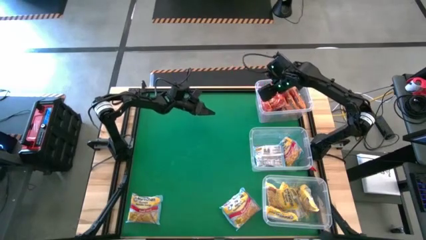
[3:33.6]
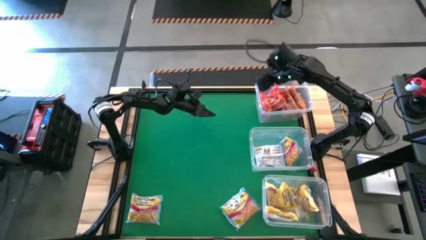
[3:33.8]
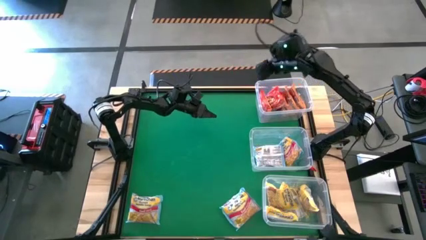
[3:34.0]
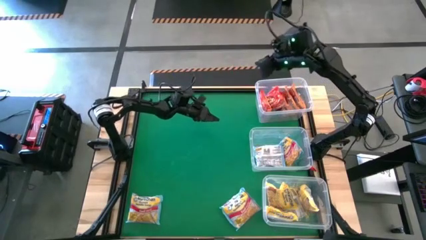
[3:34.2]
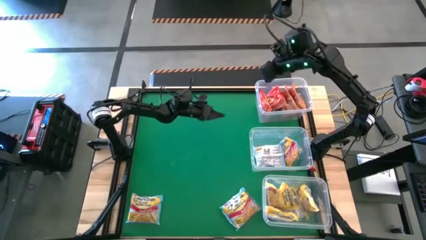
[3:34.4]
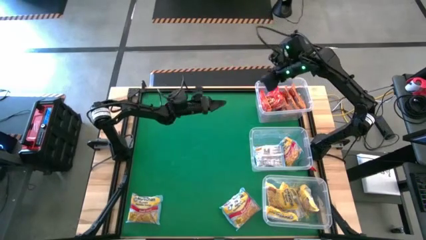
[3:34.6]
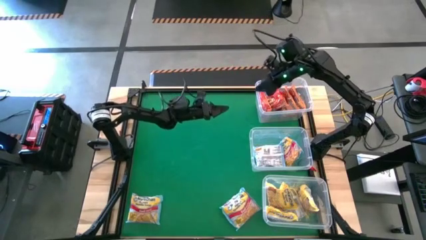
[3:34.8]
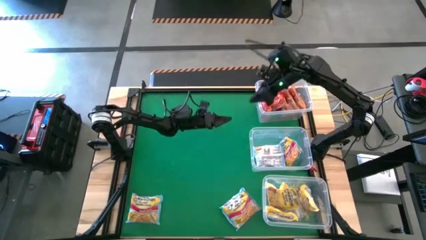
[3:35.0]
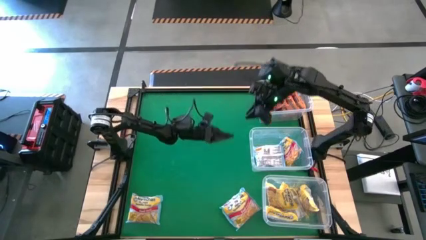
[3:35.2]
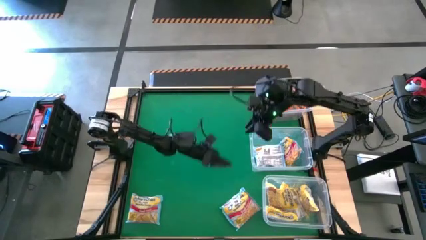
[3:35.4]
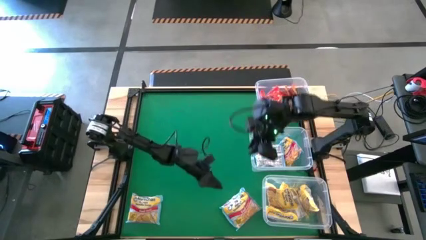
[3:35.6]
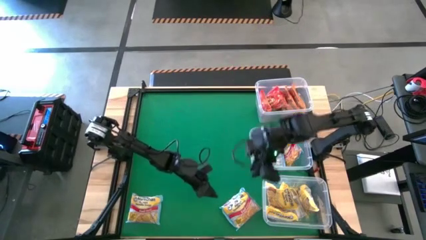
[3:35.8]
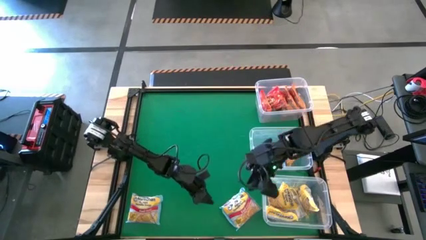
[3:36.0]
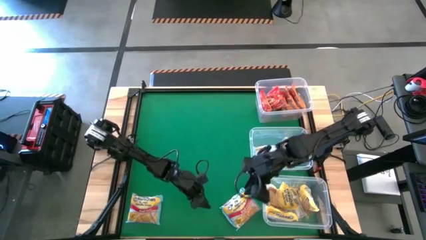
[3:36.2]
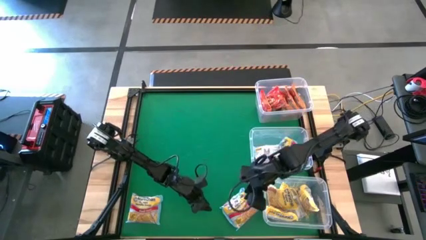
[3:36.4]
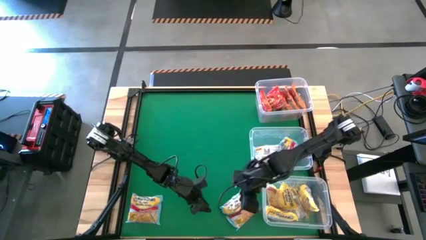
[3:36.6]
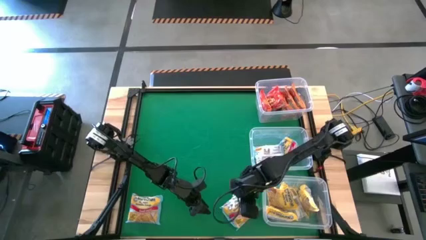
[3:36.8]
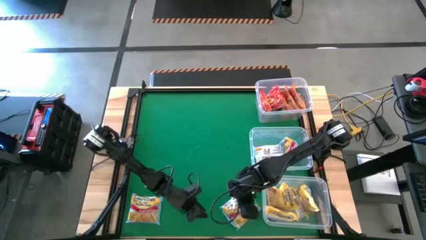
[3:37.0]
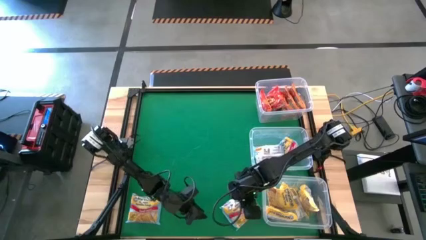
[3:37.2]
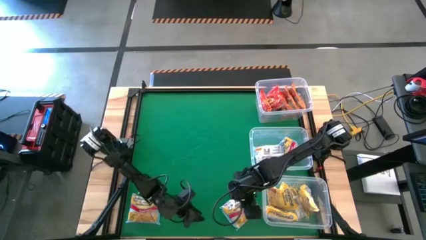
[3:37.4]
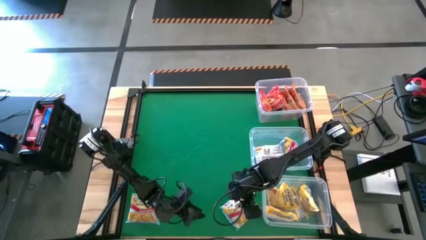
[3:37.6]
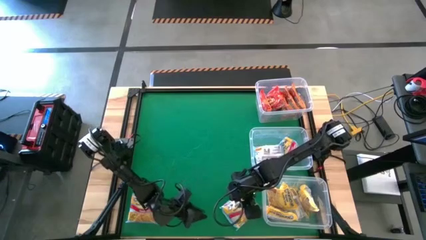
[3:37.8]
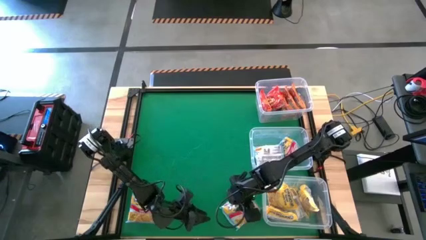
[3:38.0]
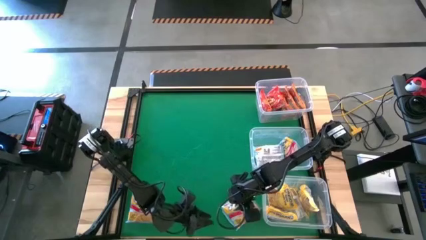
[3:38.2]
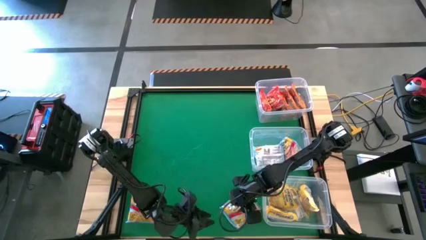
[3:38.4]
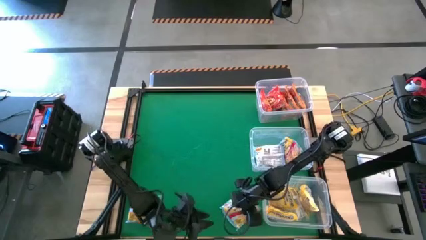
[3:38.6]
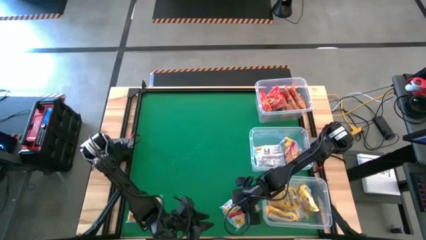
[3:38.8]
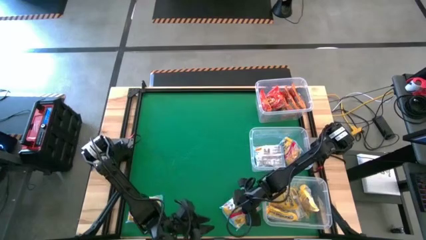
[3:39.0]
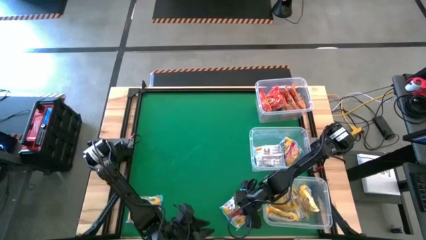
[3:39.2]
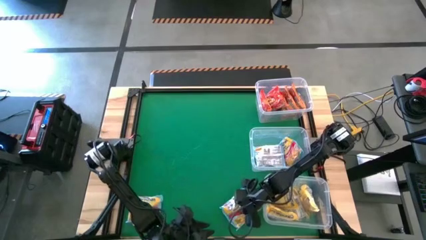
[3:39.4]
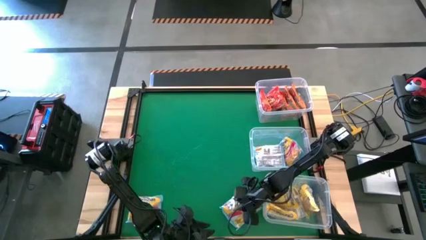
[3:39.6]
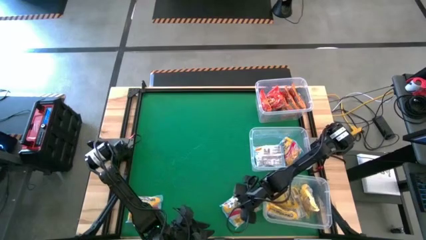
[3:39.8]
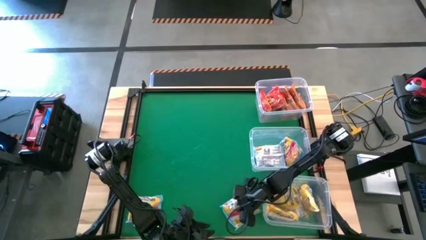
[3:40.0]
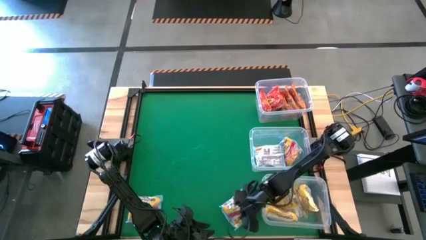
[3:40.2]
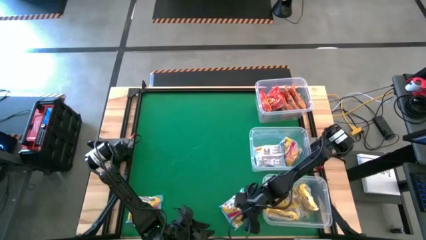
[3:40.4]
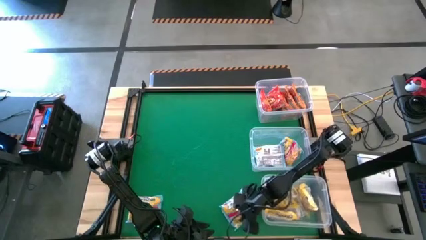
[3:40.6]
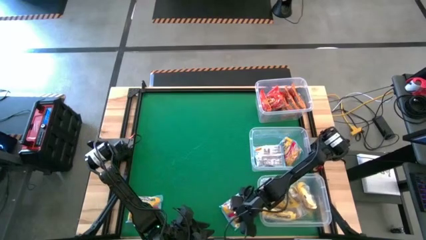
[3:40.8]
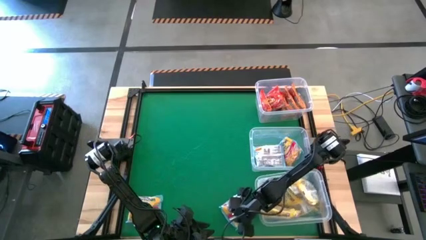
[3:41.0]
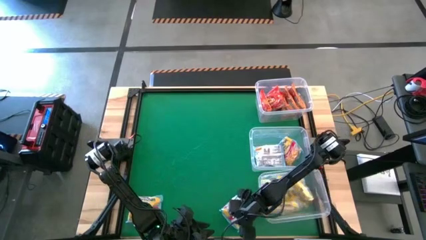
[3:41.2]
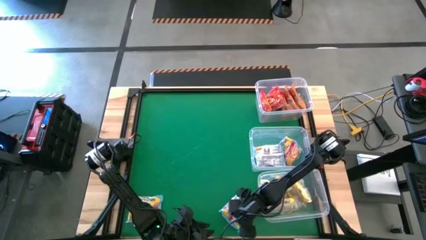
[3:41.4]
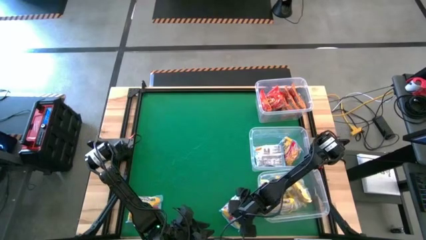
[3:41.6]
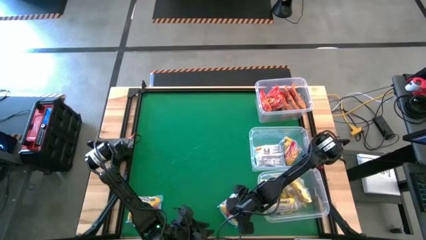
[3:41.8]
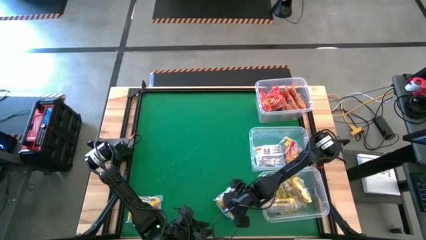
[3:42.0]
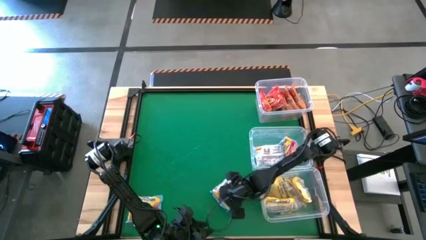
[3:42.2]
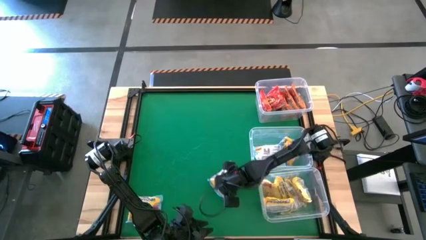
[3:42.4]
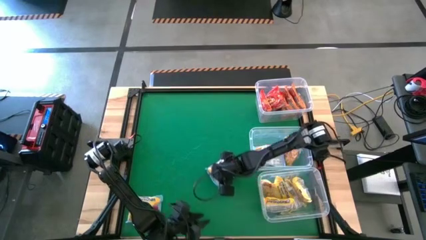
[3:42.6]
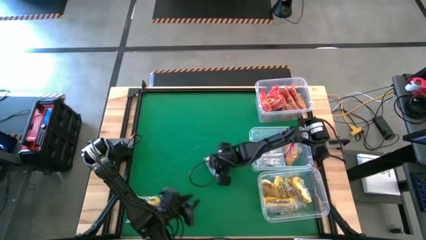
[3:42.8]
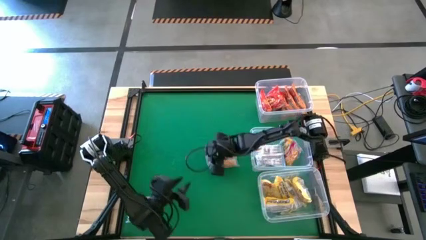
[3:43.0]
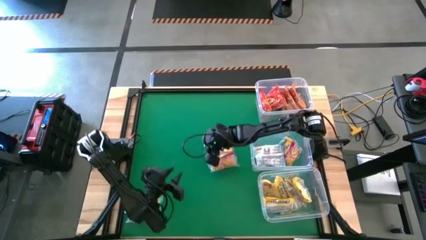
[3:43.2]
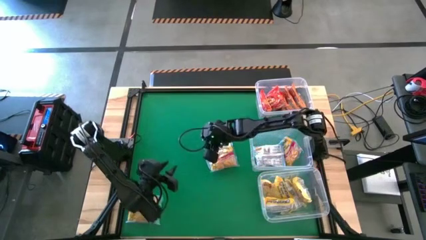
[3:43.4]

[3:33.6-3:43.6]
Task: Sort Maruchan noodles
Move the right blue noodle pack to the center of the table

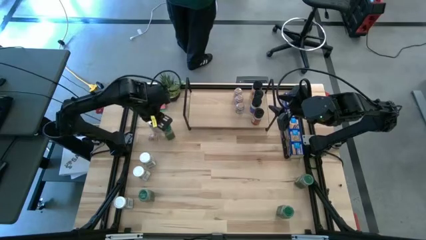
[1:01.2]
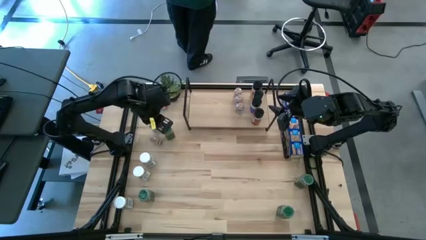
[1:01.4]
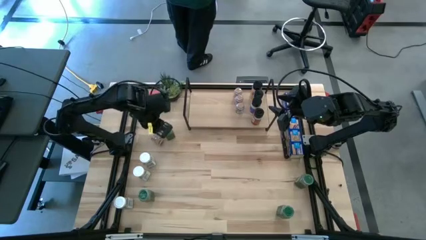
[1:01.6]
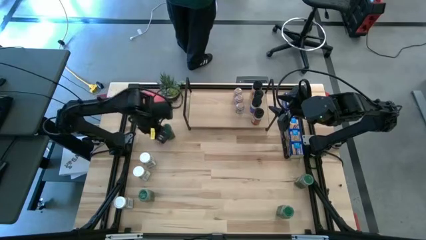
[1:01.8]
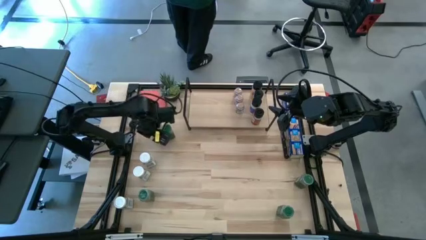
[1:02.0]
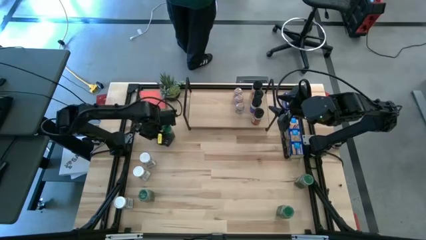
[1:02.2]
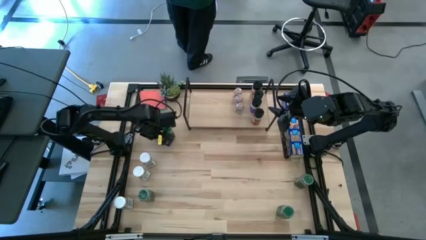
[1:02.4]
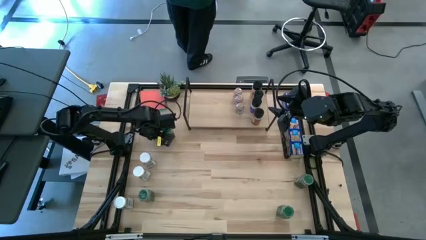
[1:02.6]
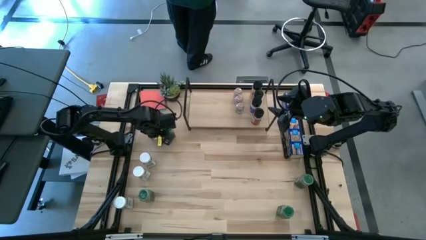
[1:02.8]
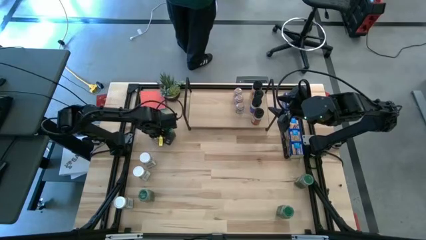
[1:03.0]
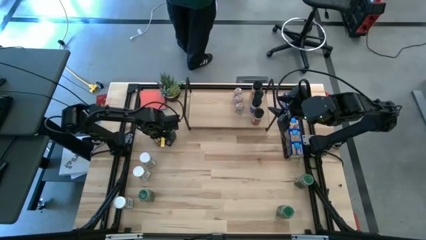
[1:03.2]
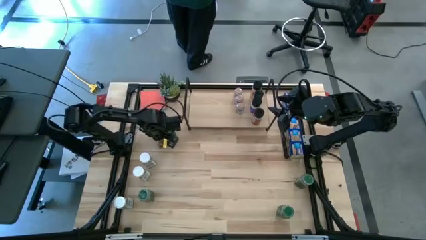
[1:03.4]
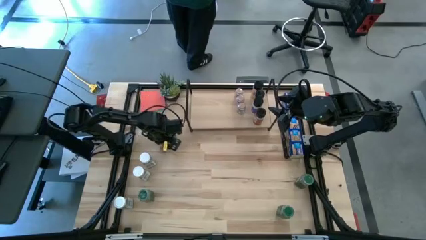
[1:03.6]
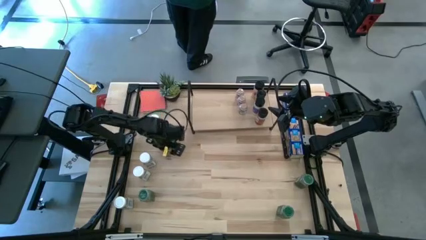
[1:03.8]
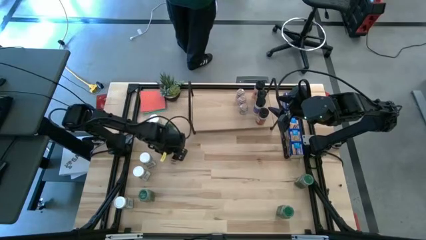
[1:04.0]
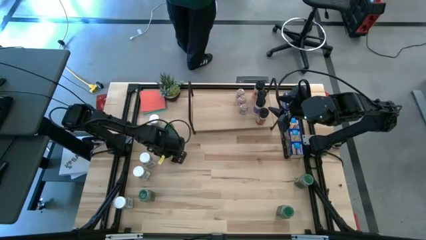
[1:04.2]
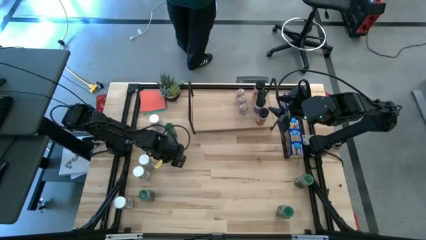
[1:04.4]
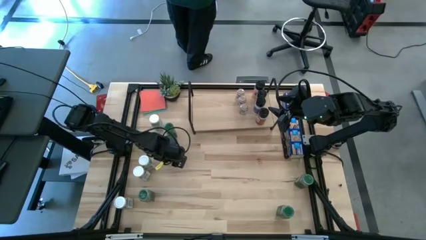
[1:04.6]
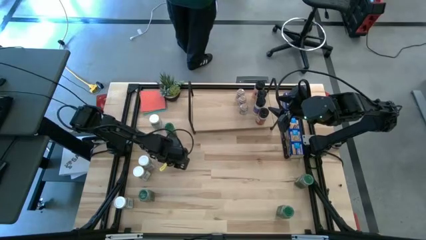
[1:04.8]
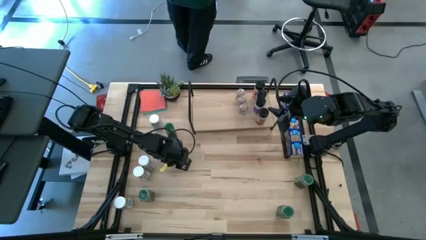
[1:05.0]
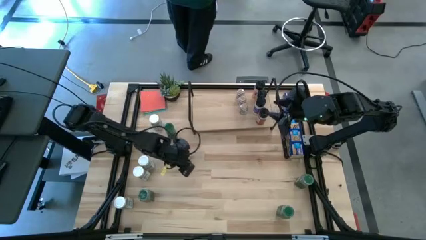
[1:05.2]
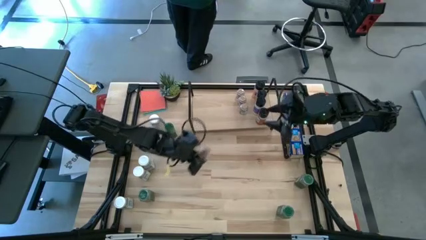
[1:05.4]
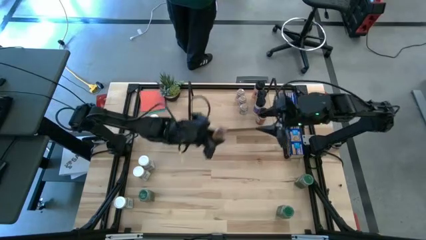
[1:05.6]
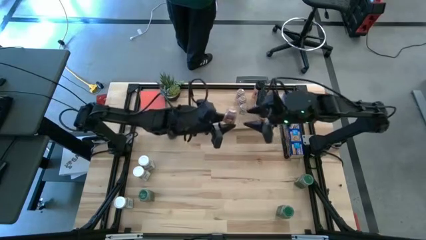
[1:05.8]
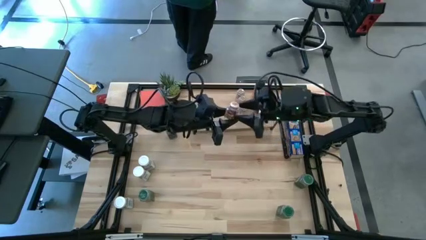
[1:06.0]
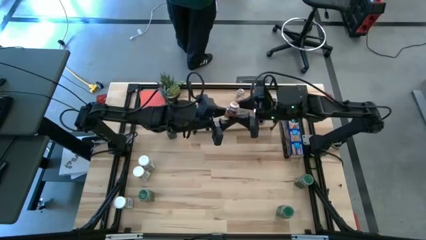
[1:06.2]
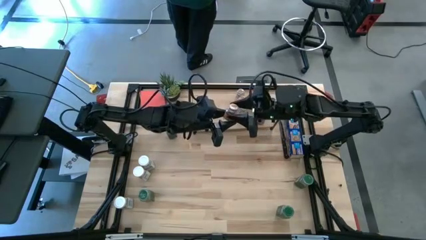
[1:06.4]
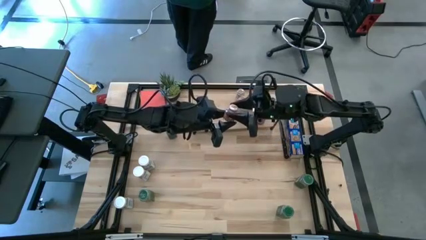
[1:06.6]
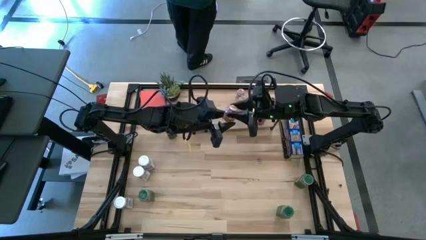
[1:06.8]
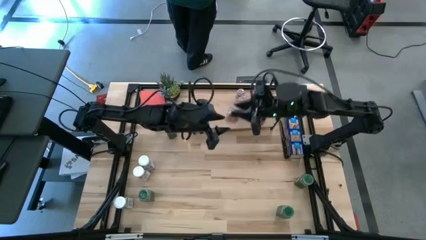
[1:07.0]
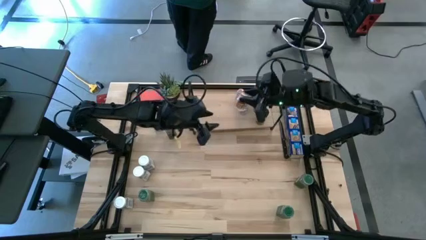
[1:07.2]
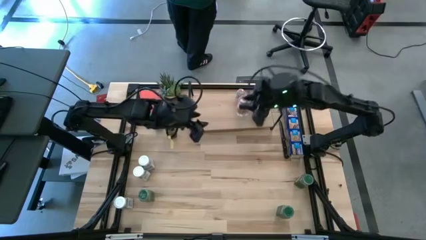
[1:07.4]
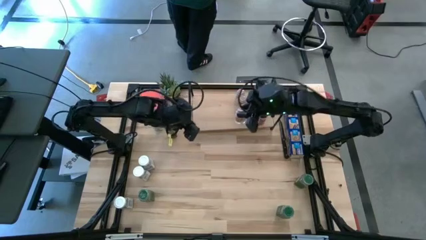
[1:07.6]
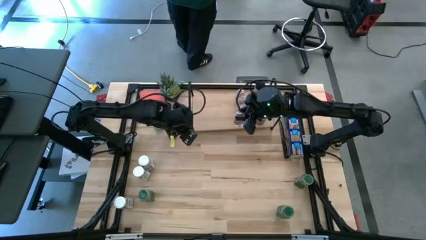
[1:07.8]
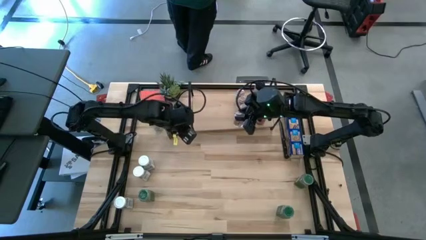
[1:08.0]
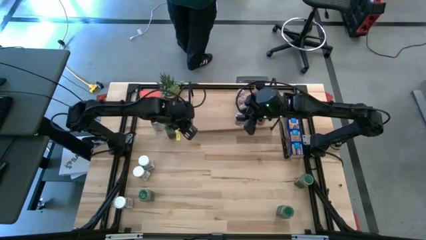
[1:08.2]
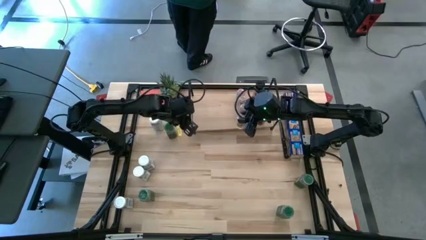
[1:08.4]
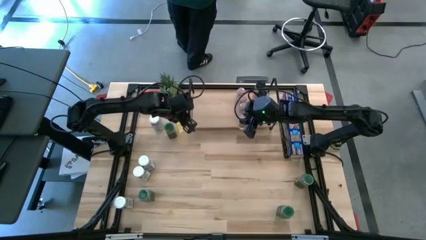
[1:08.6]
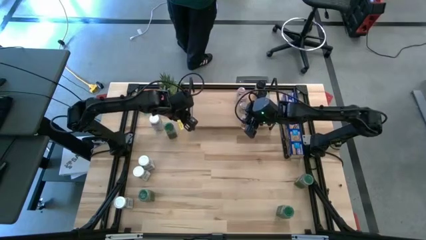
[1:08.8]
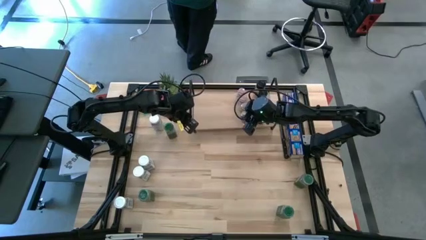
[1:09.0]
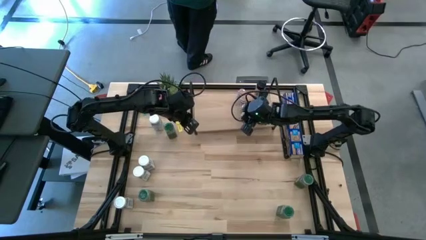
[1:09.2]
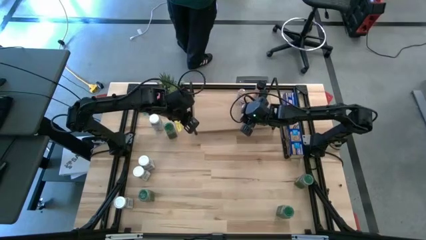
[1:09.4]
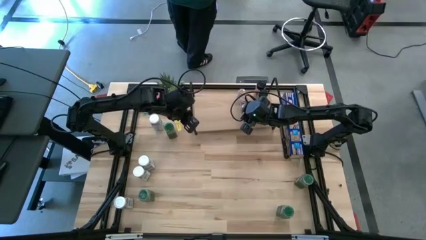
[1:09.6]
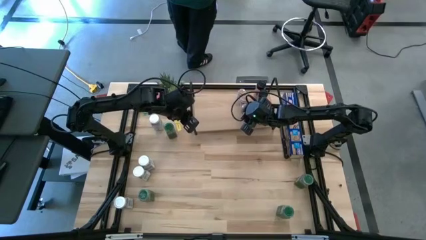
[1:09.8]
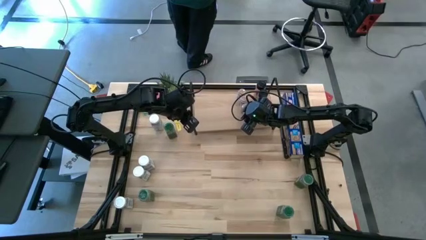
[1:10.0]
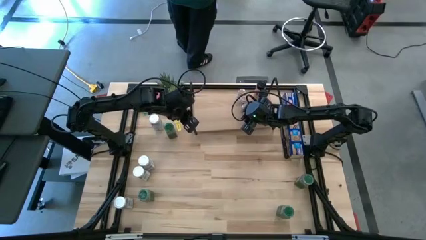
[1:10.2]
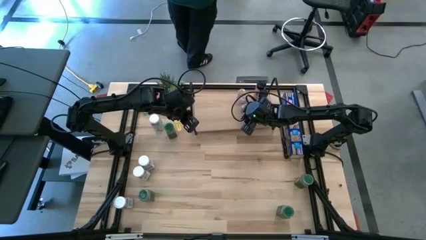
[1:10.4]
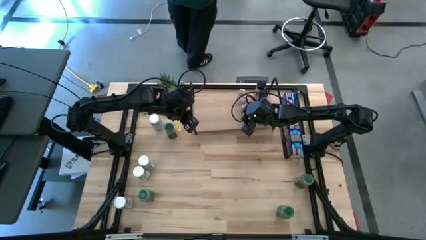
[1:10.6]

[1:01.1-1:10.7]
Task: Shelf spices
Put the brown seasoning bottle on the shelf, aligned with the other brown seasoning bottle
